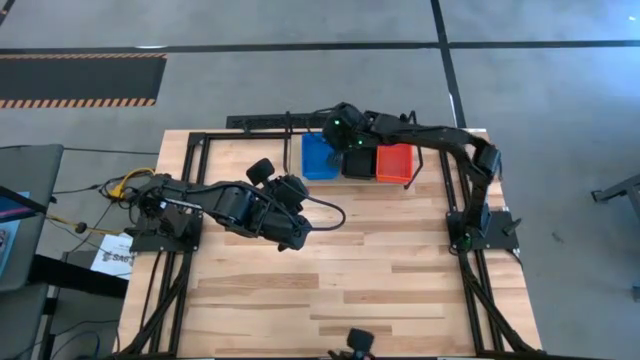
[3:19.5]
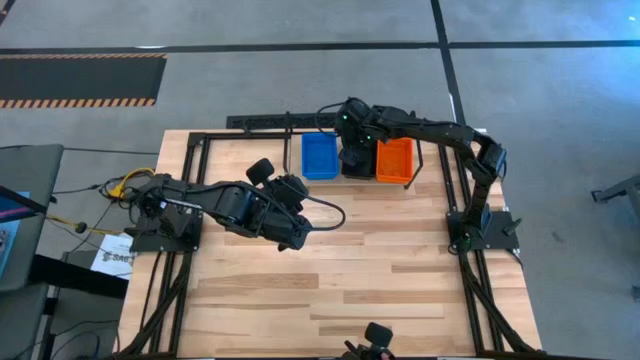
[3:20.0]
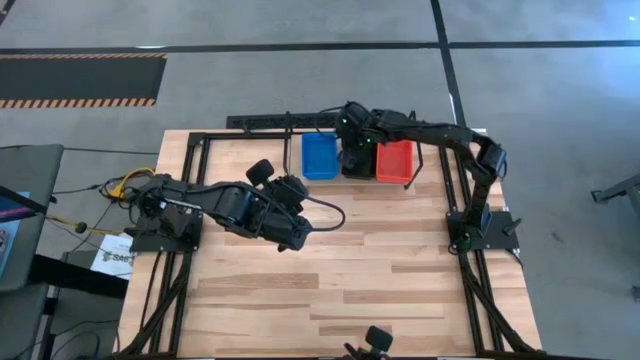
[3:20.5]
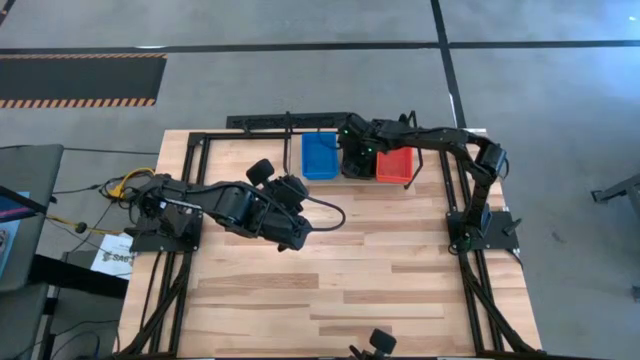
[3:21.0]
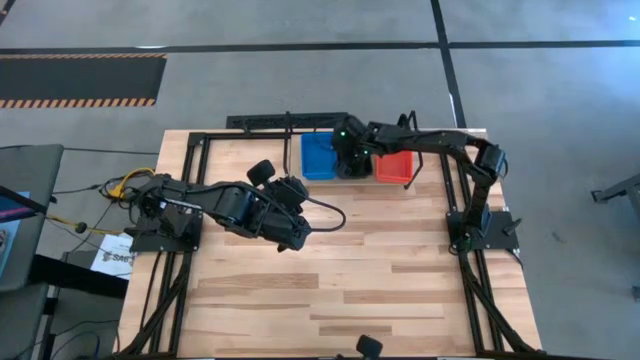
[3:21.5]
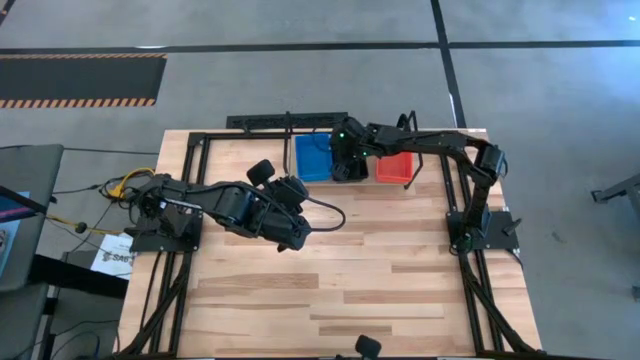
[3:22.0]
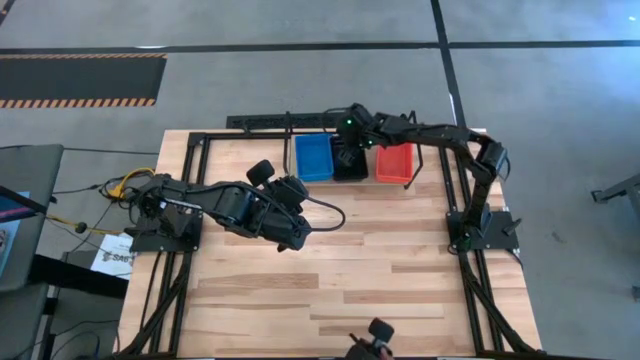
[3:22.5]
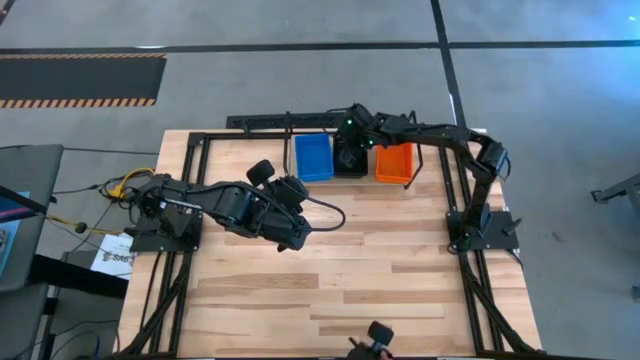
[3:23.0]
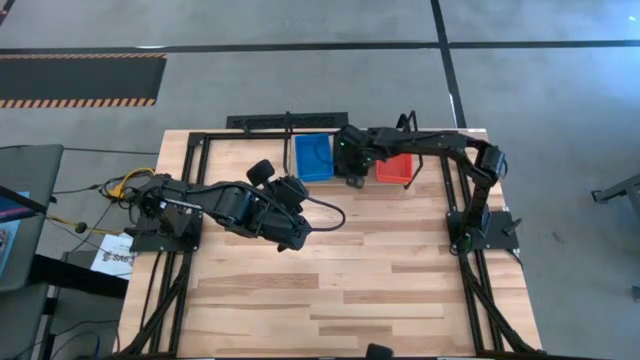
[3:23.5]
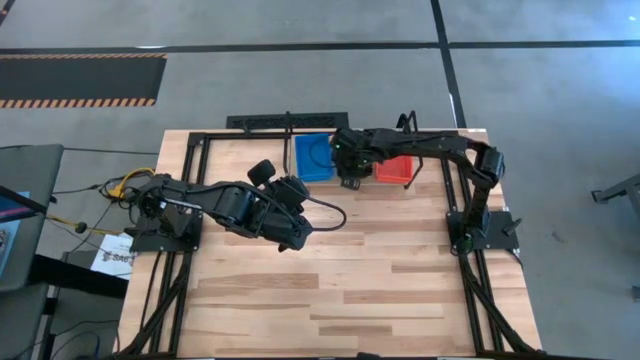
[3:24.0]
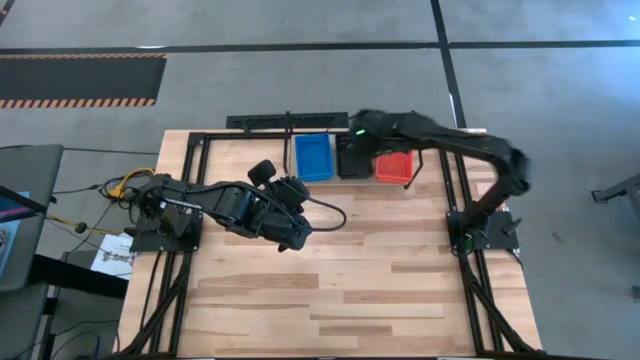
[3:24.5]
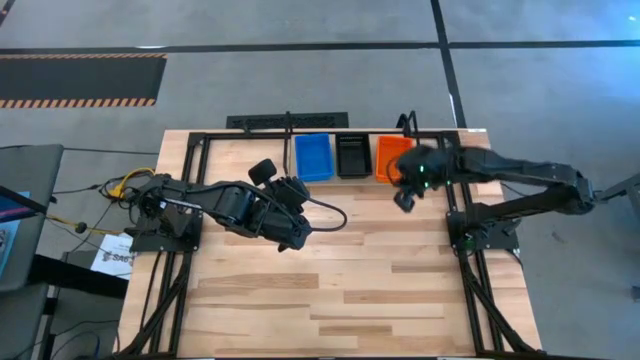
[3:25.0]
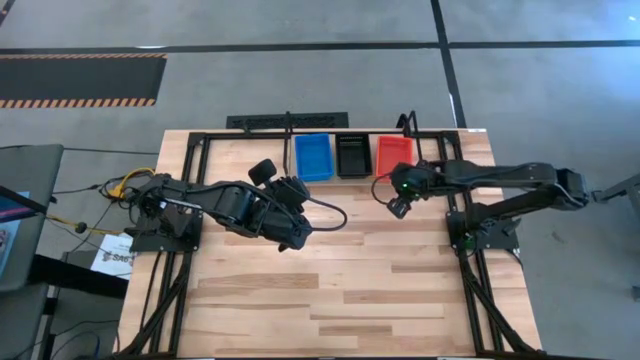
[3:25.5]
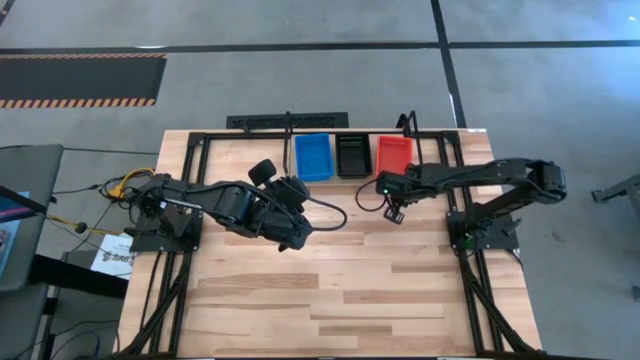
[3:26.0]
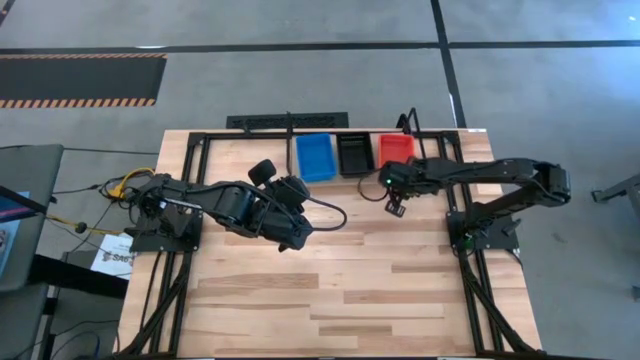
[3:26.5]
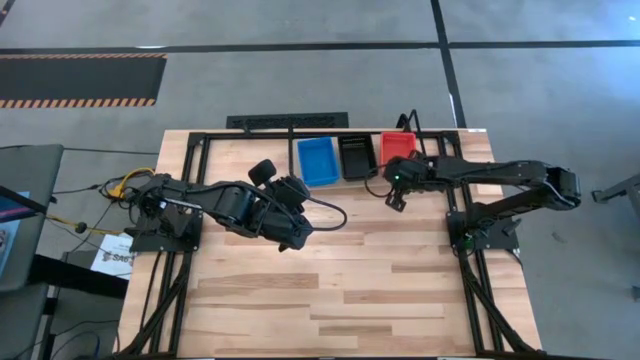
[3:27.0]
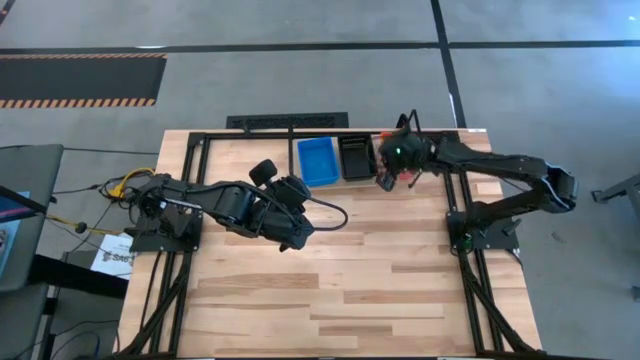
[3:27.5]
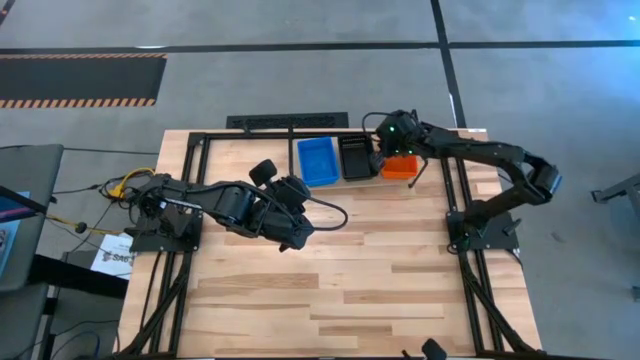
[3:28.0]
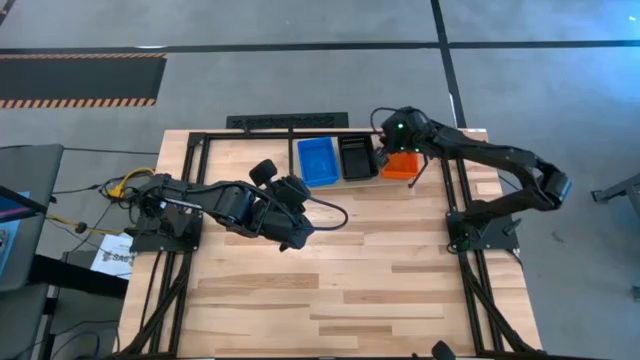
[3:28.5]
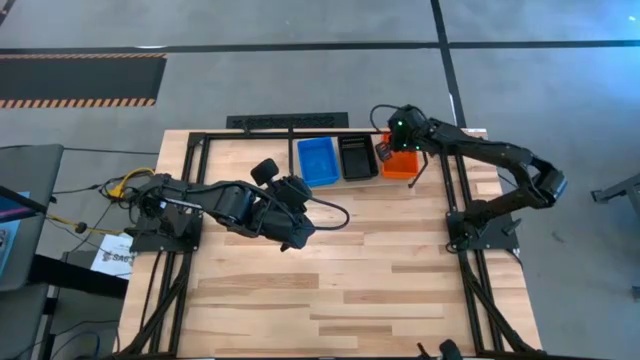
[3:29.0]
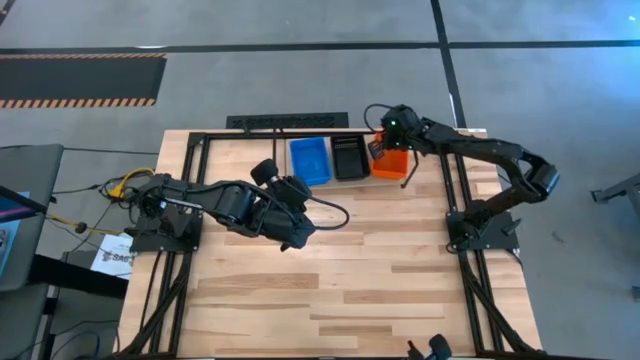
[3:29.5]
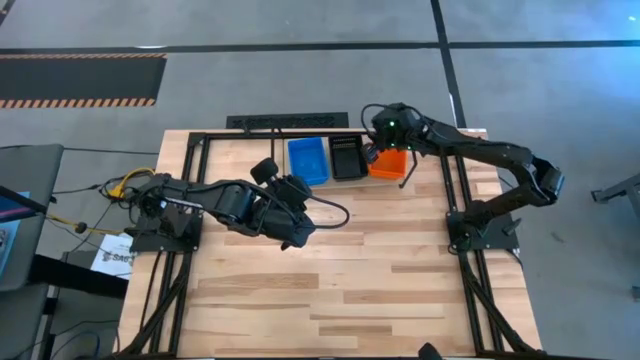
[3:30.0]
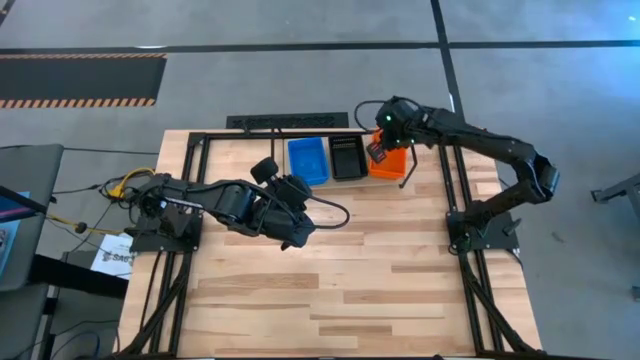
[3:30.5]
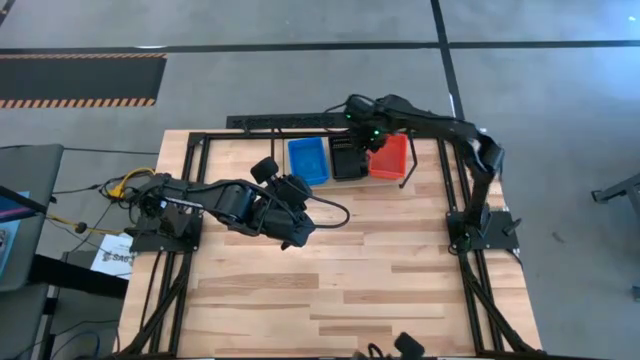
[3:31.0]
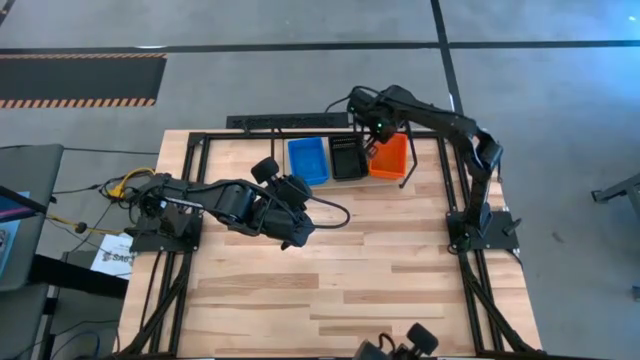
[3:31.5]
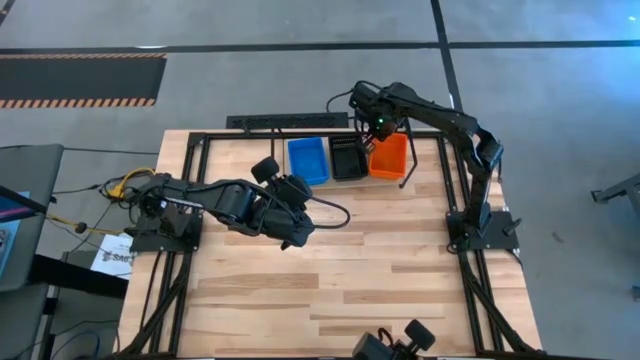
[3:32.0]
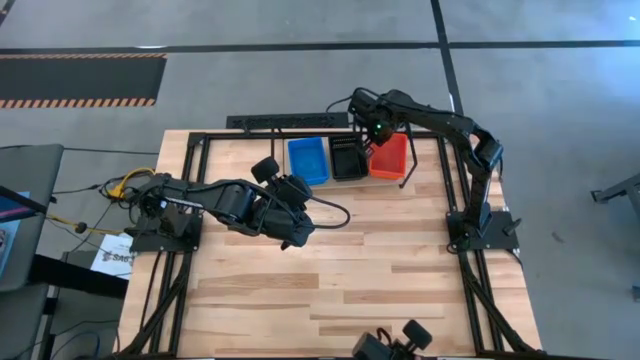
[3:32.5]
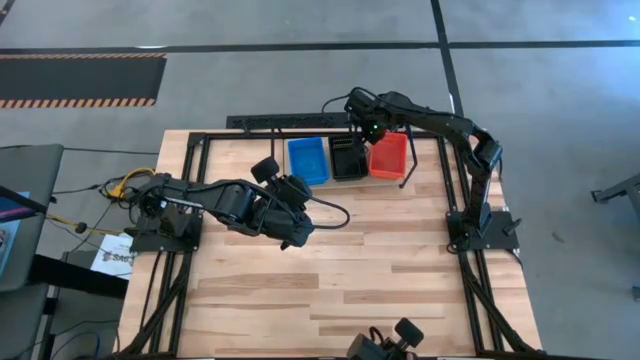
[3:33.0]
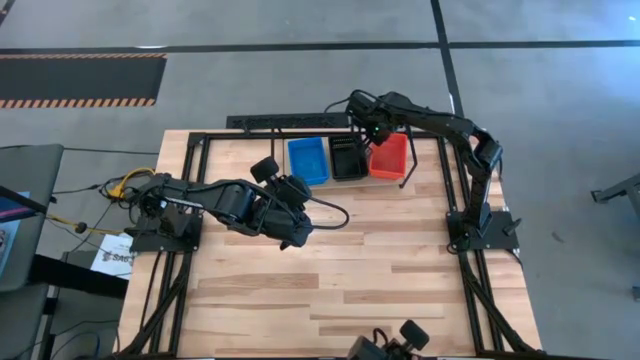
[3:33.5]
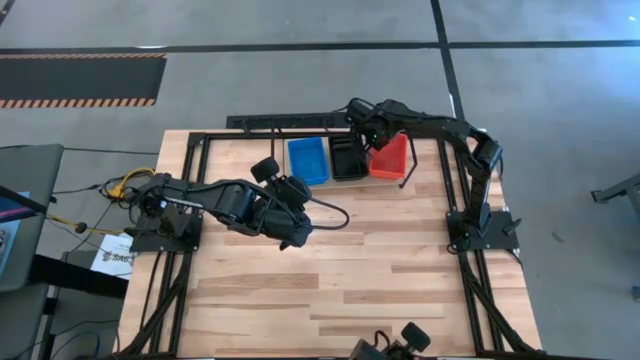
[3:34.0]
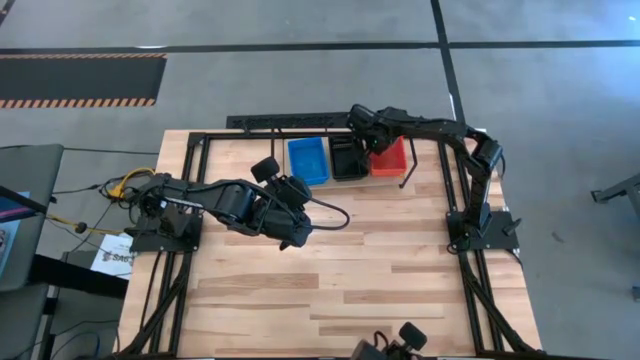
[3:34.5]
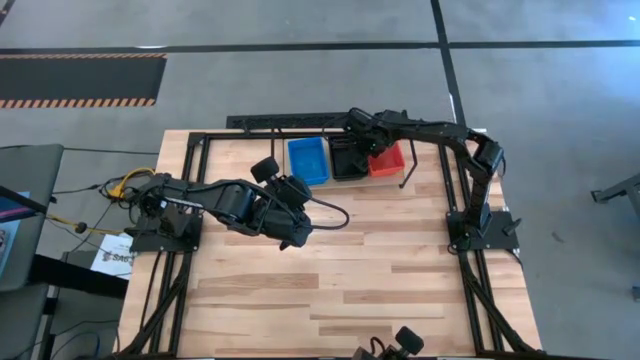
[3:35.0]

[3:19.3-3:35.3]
Task: Stack baskets on shelf by color
Adjust the bins on the shelf

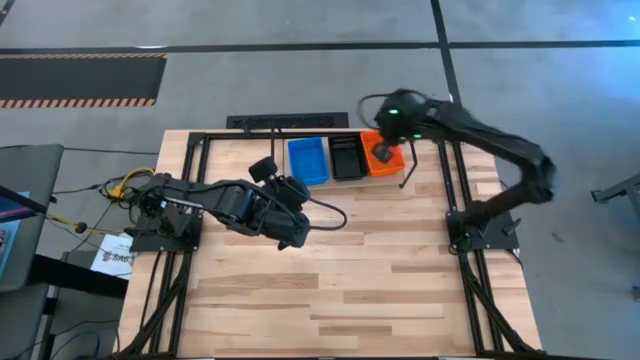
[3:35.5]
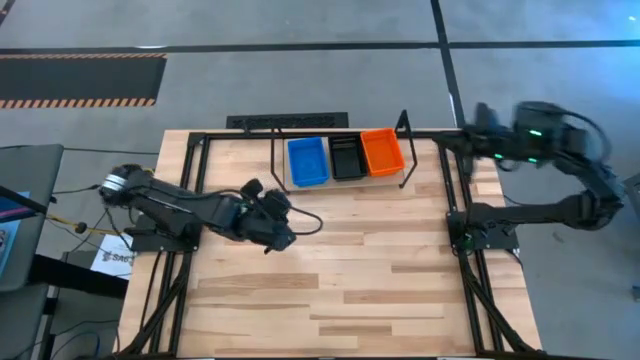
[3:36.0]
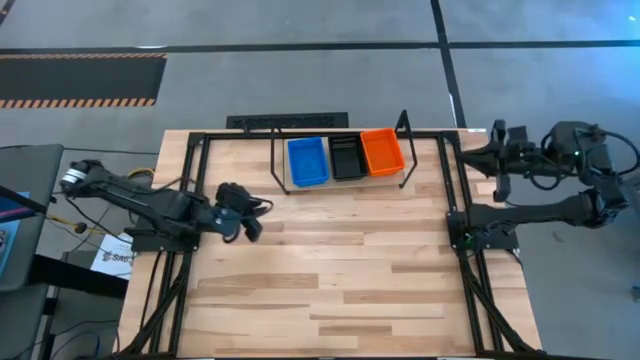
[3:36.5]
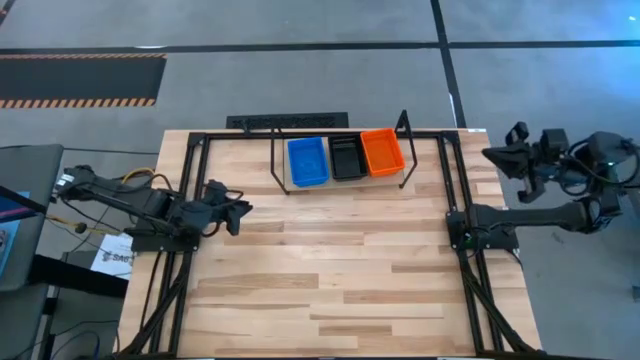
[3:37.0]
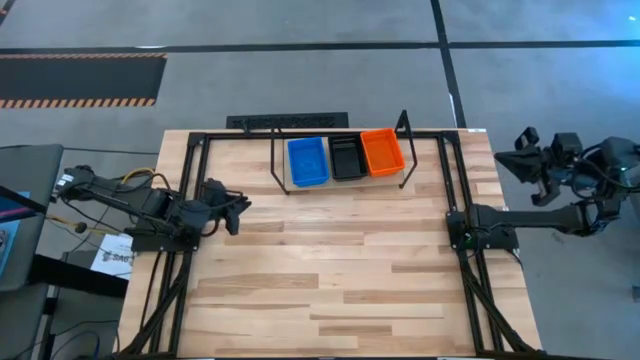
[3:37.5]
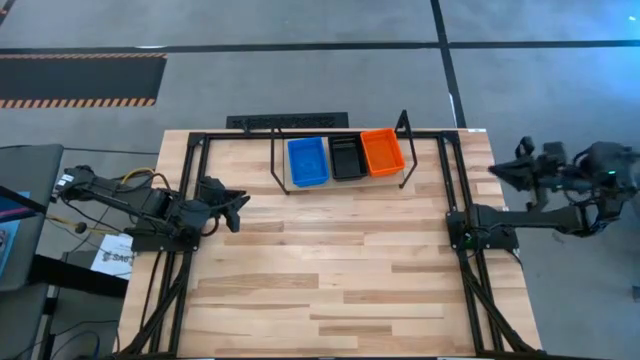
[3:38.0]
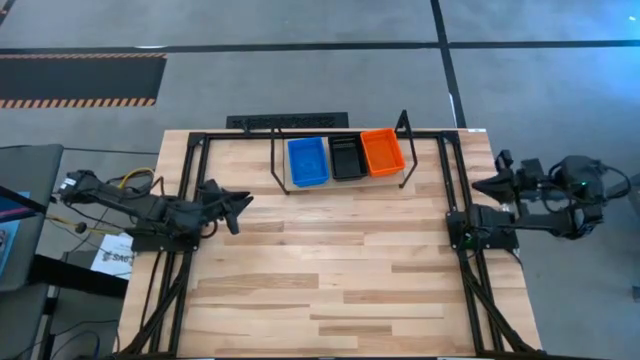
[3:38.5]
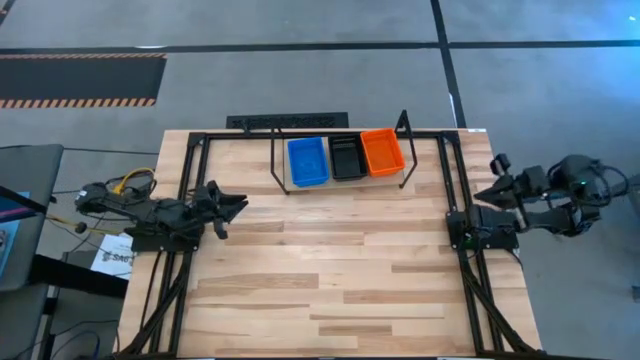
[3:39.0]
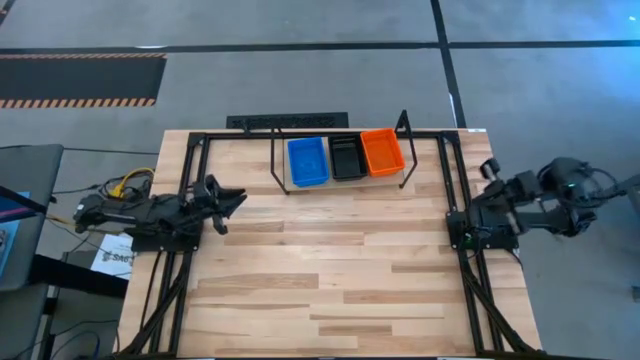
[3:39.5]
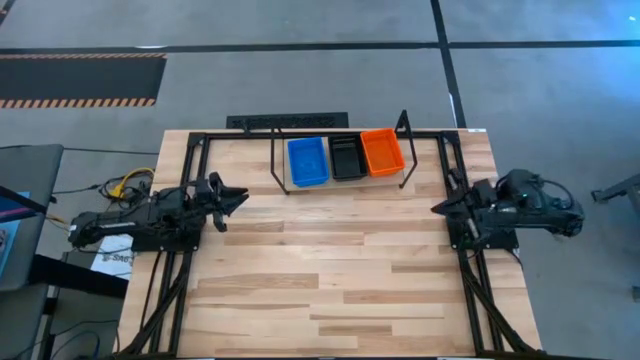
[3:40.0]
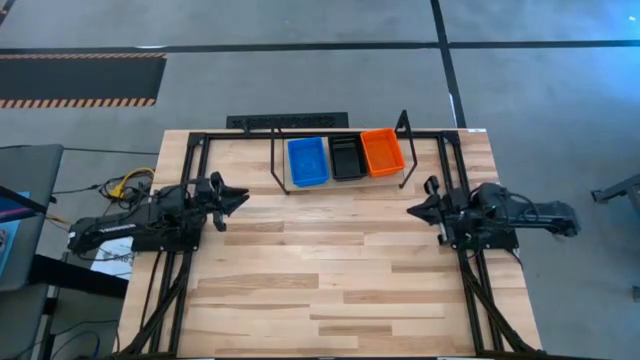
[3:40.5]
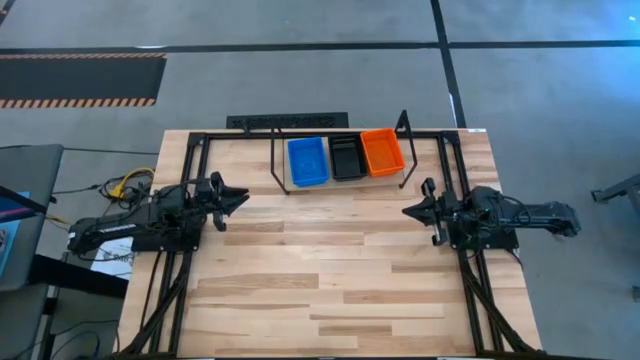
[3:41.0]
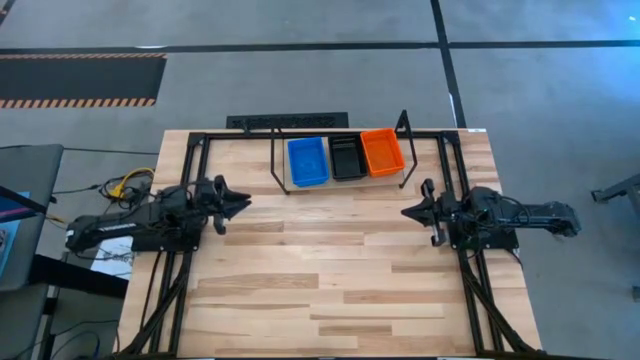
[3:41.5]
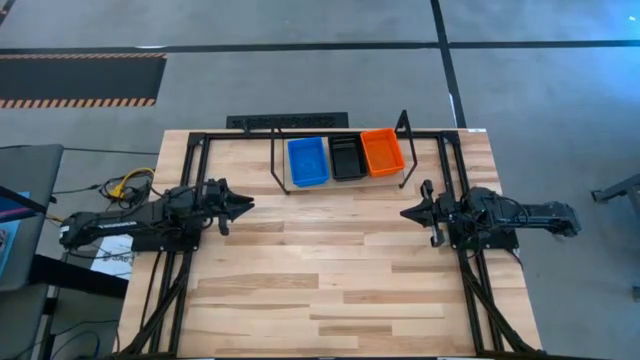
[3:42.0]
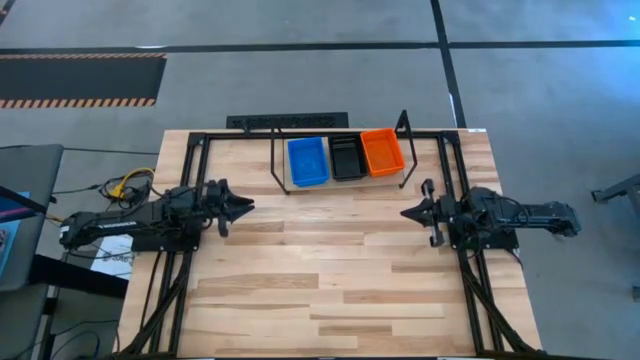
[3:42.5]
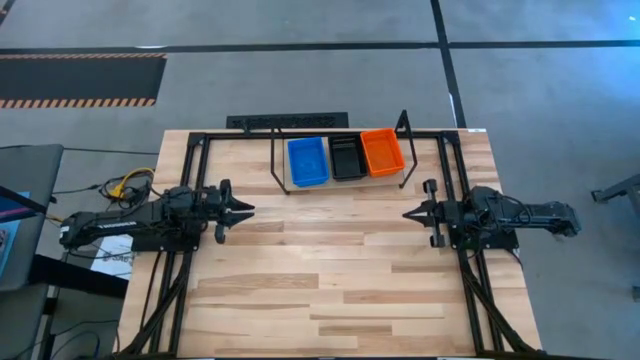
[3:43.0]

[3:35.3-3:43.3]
Return to Home Position
